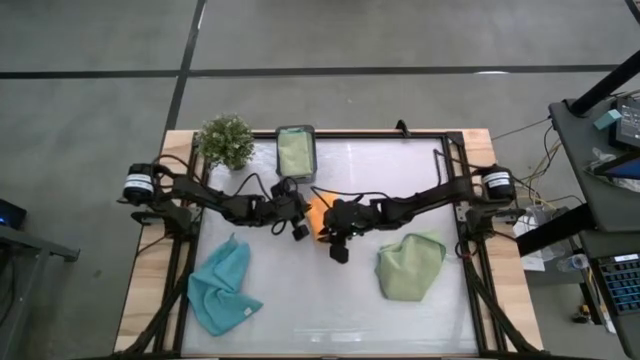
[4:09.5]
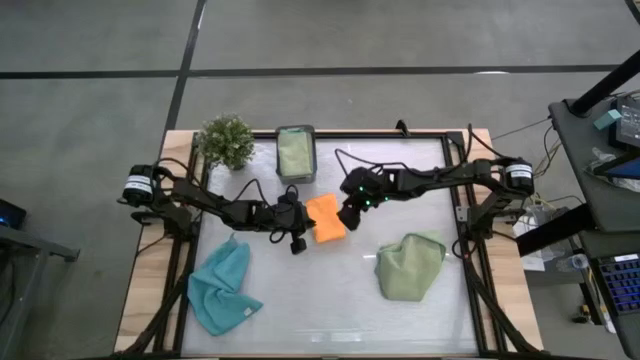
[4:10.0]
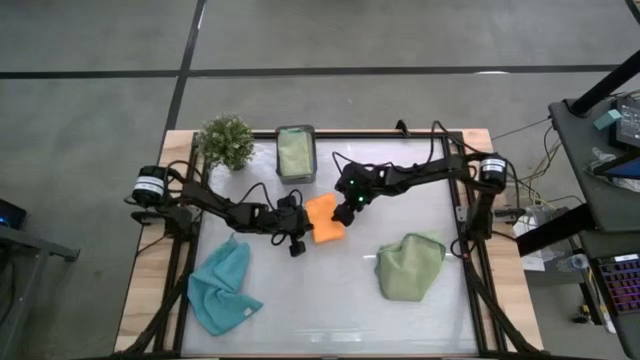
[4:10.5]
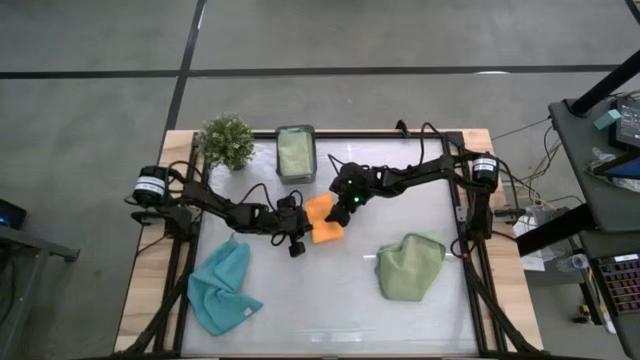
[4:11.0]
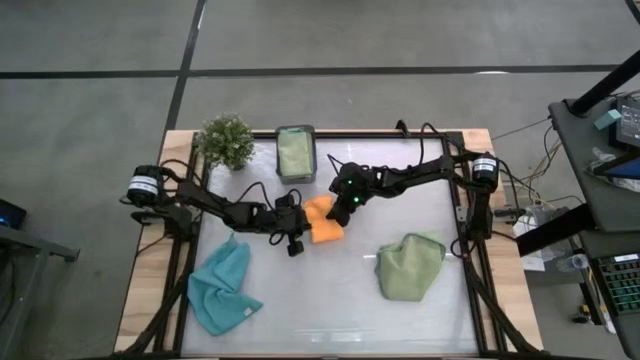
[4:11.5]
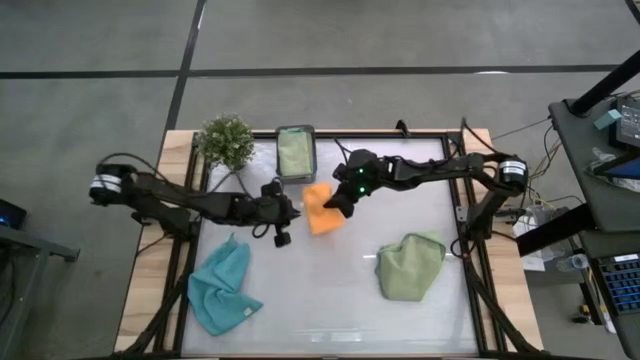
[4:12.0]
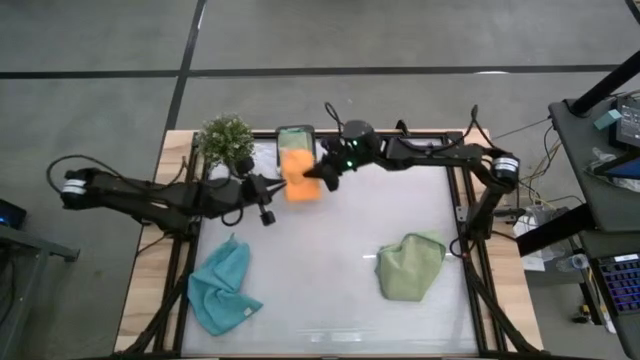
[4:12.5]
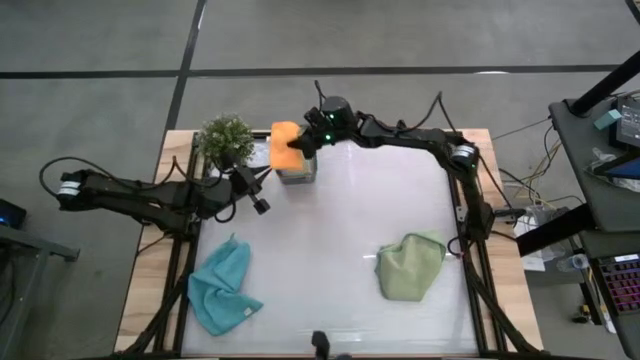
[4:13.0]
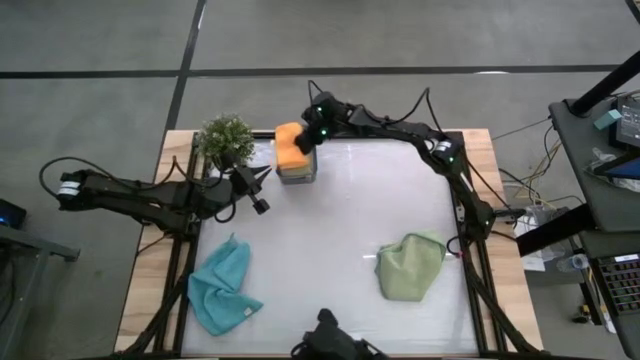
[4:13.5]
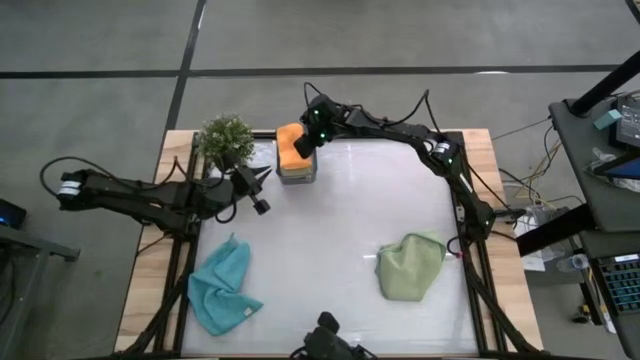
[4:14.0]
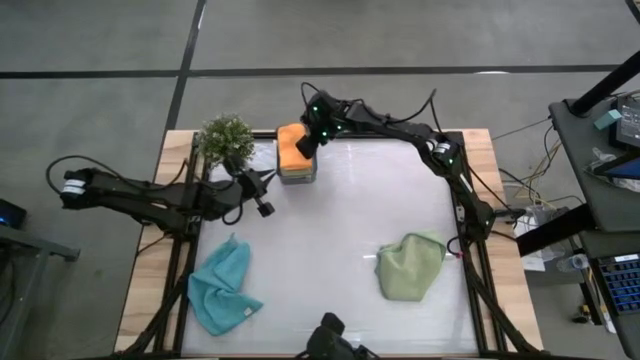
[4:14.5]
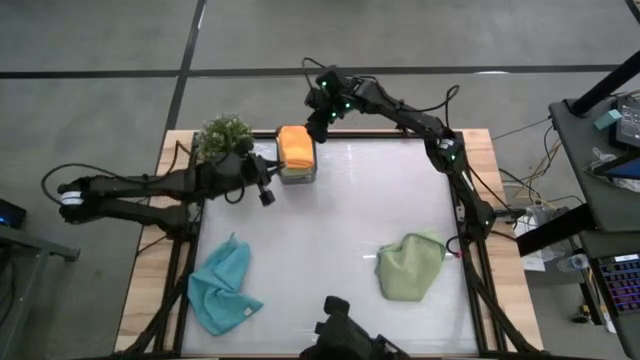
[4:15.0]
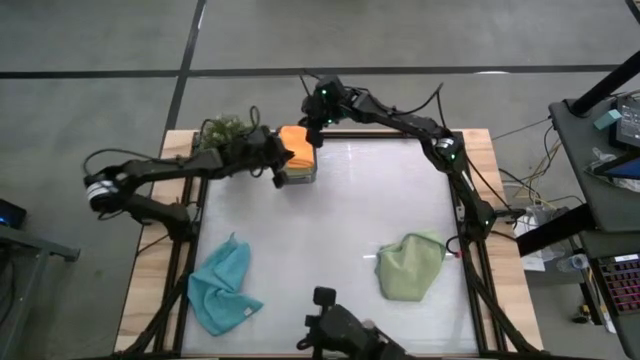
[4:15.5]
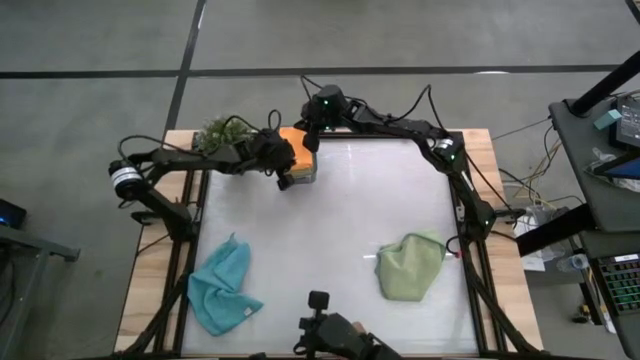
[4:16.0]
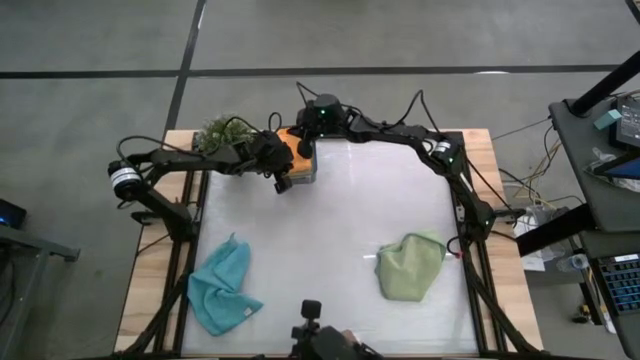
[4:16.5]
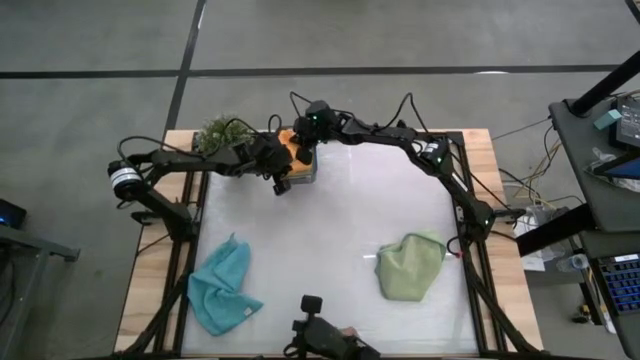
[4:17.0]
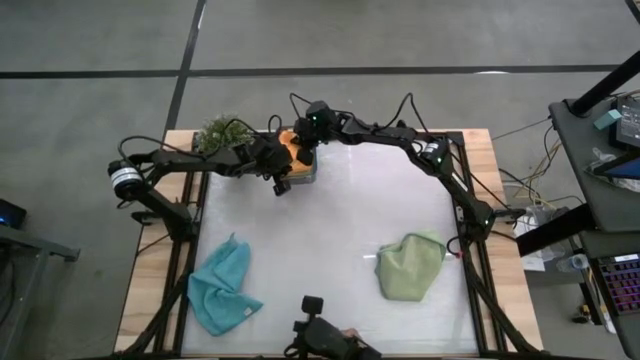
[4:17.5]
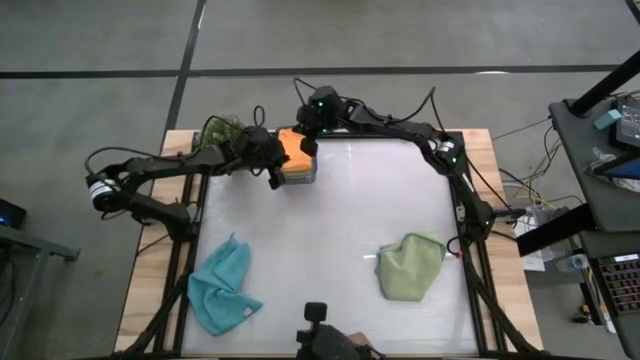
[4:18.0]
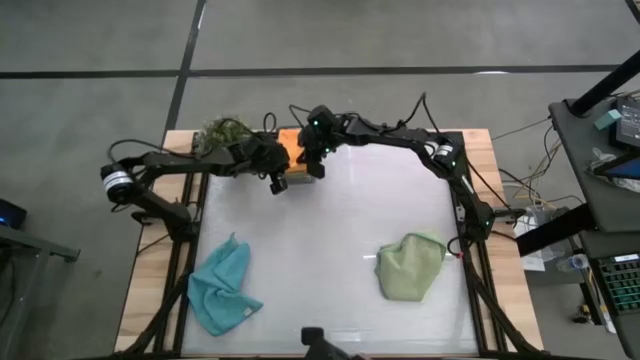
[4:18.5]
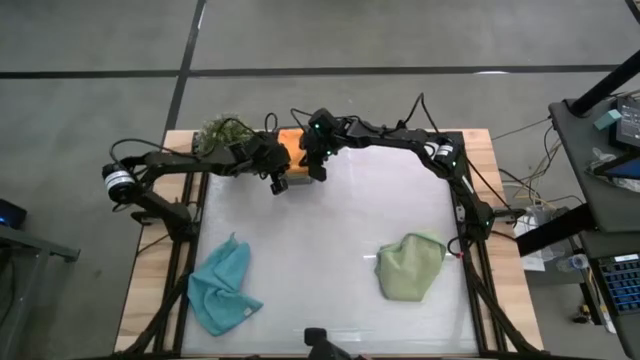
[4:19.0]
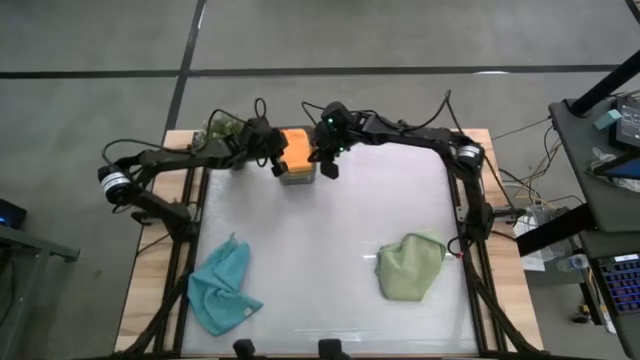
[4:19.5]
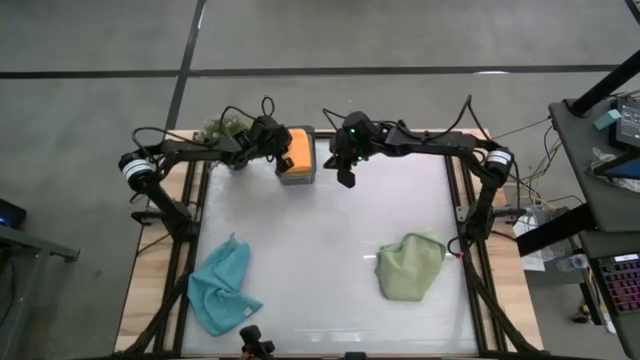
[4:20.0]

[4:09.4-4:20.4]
Task: Fold microfiber towels
Put the yellow folded towel into the bin

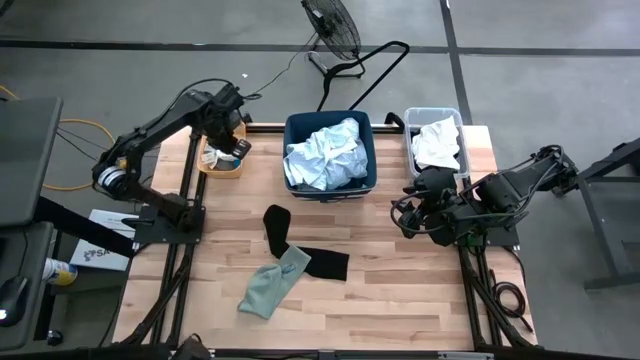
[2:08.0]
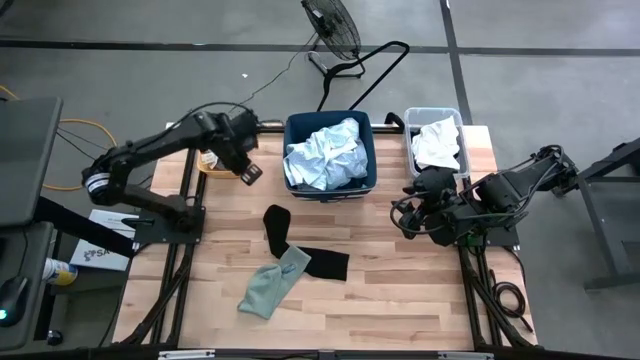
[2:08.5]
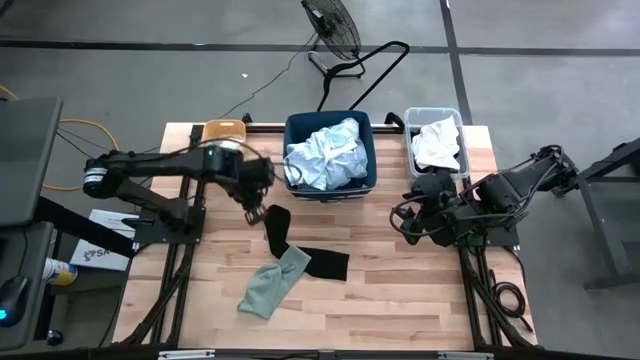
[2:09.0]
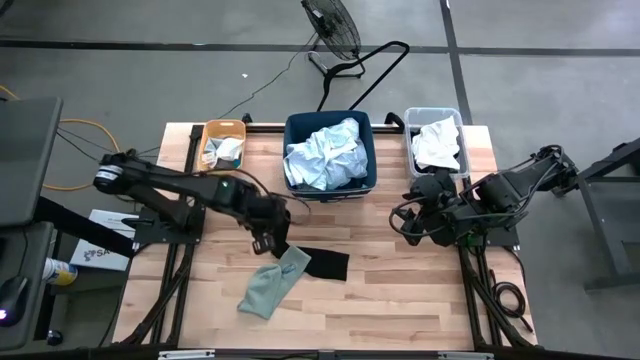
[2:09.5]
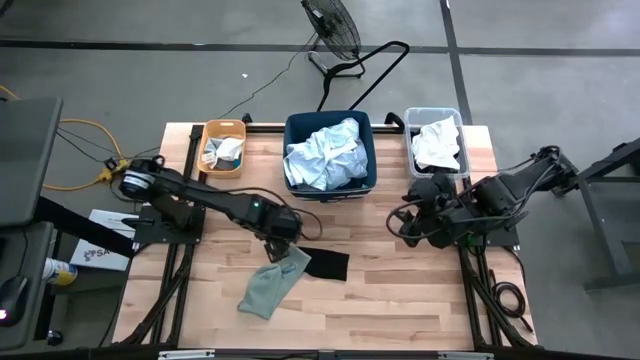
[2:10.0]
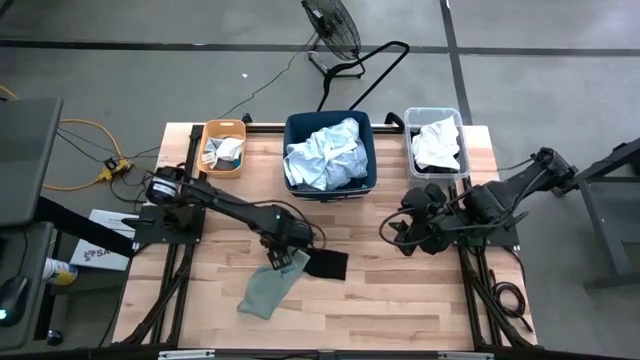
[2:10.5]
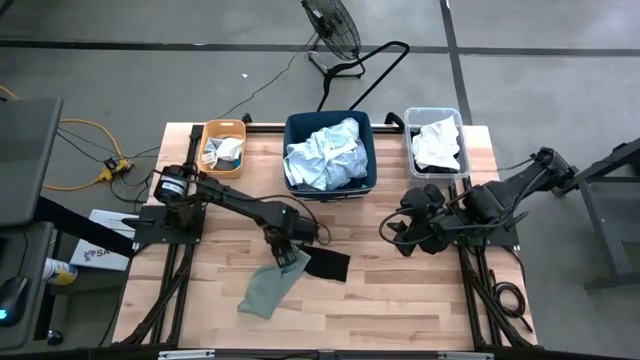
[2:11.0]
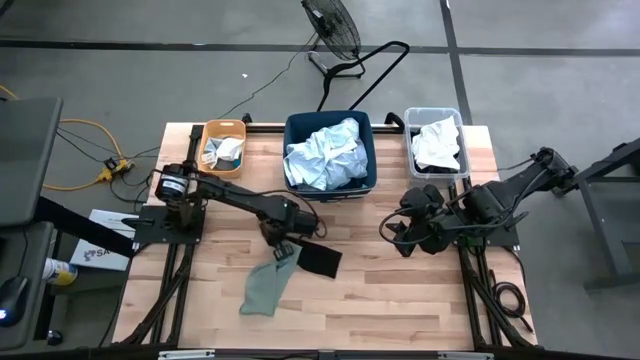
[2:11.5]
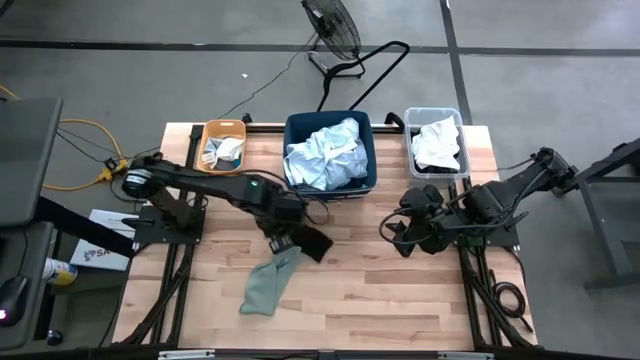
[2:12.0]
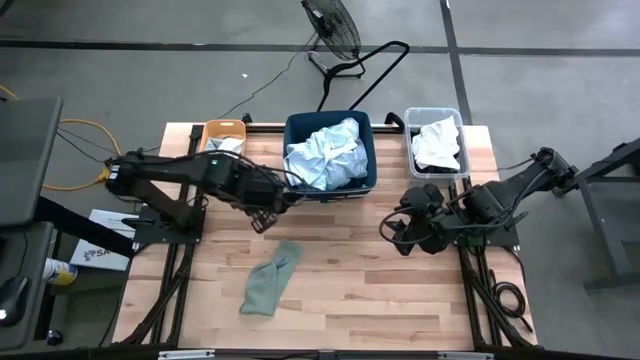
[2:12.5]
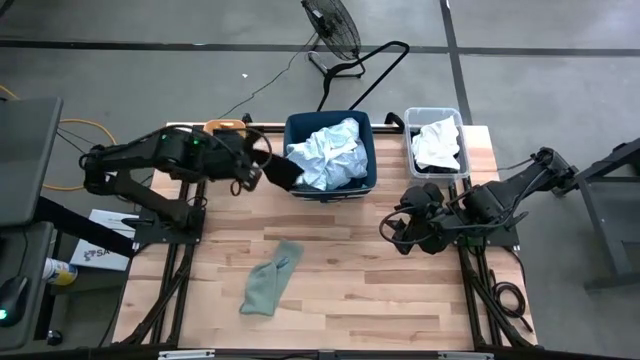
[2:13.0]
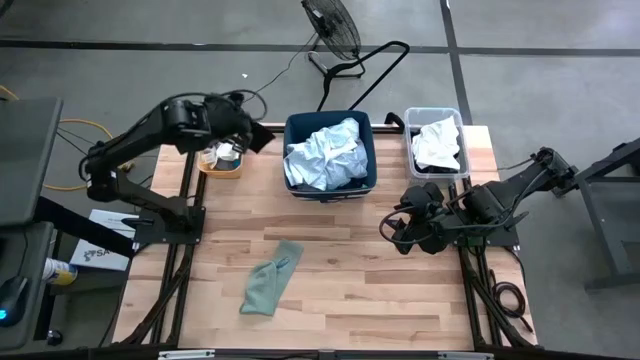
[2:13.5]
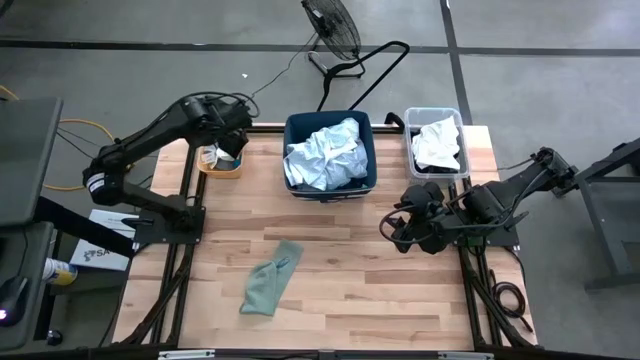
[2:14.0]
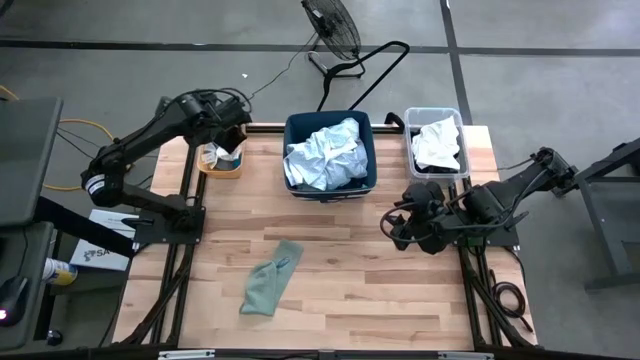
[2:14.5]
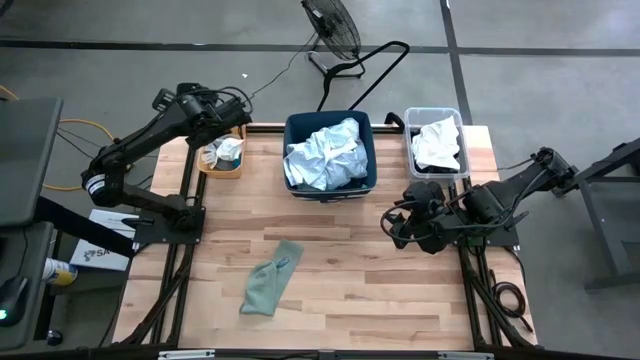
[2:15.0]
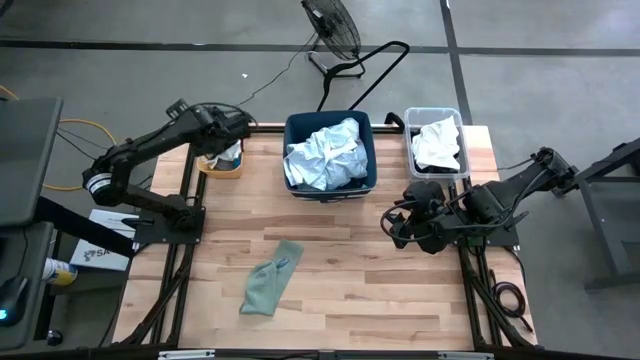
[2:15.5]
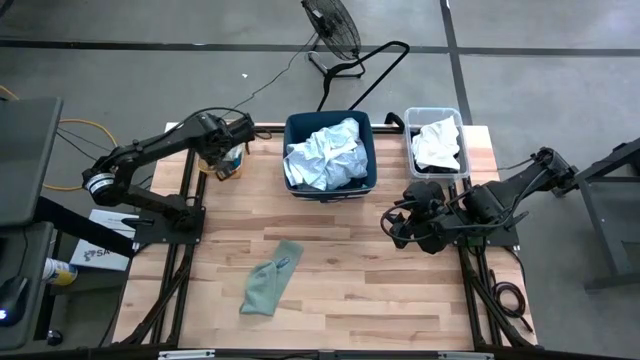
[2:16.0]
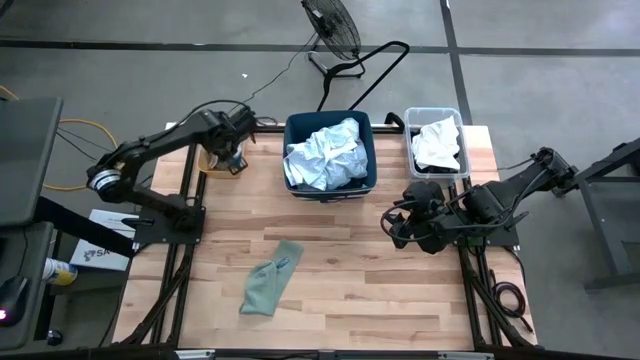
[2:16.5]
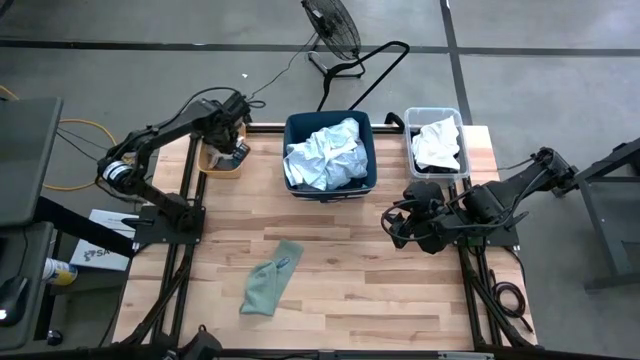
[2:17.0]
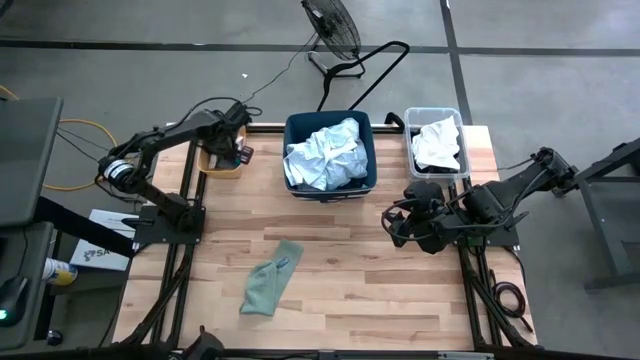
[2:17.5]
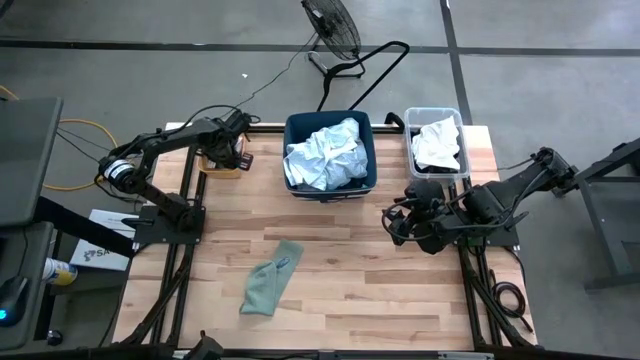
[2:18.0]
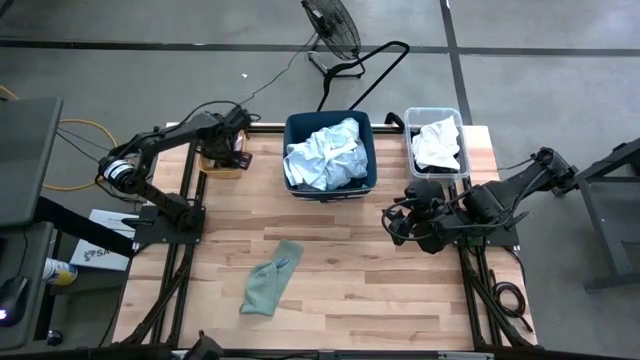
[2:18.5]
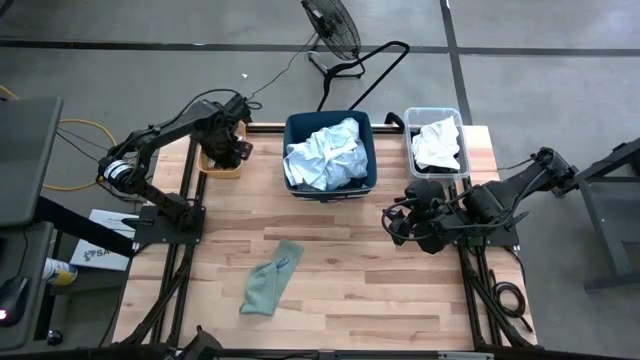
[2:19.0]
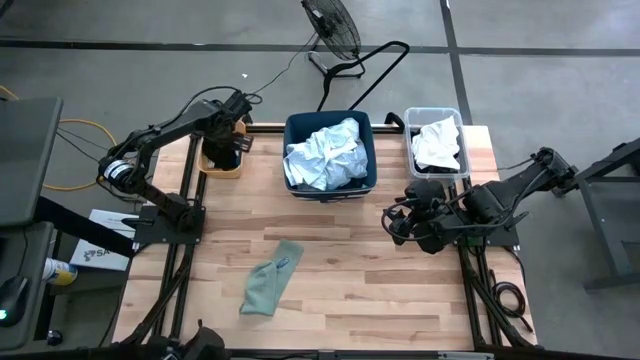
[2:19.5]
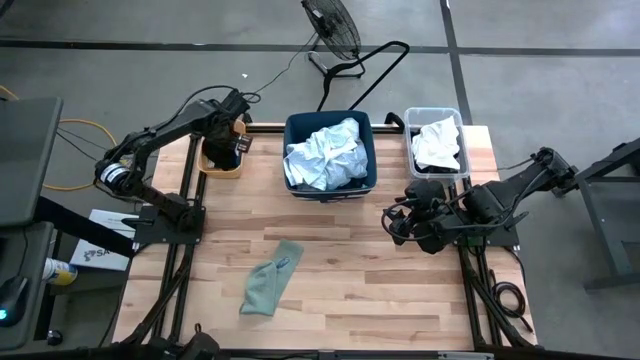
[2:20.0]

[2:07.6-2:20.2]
Task: Pick & Place Cloths
Put the black sock into the yellow bin
